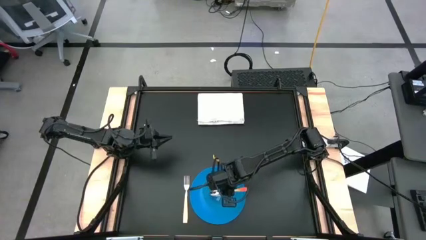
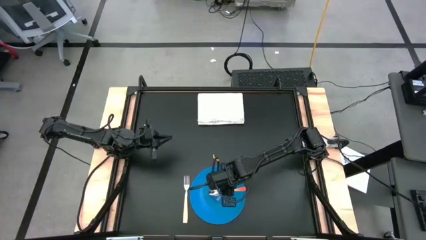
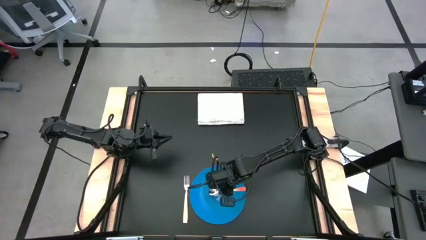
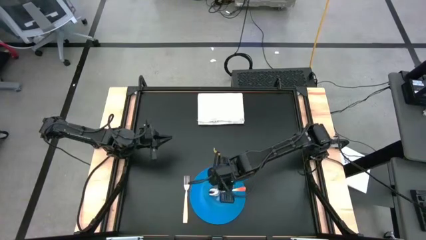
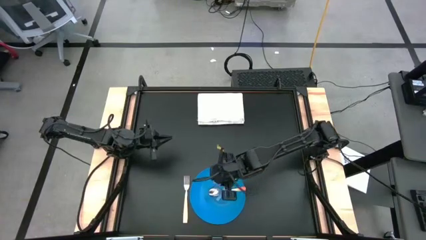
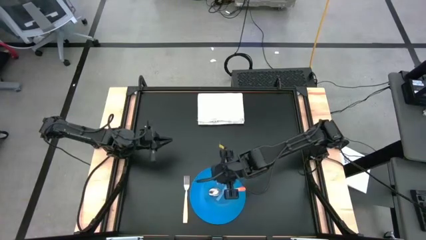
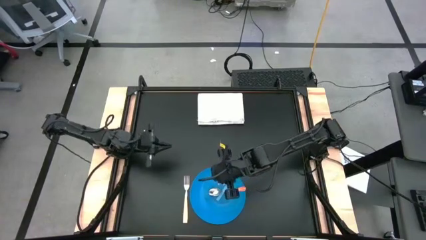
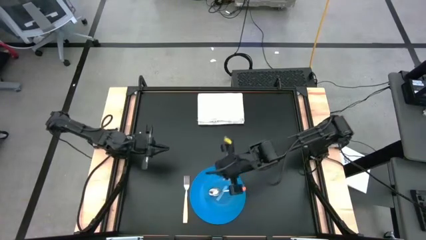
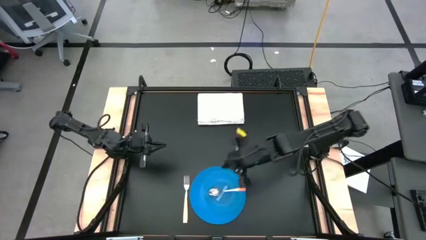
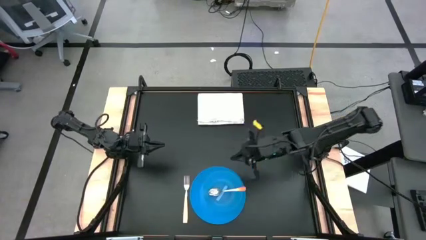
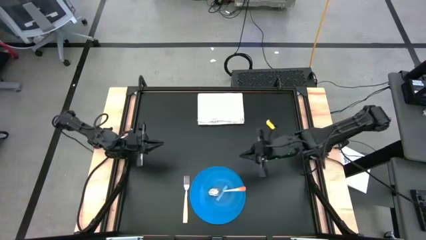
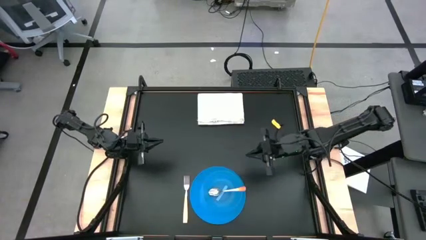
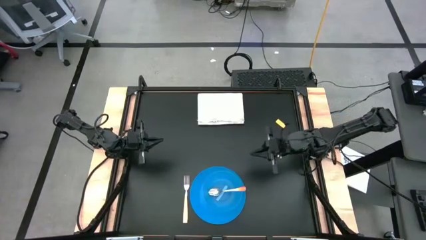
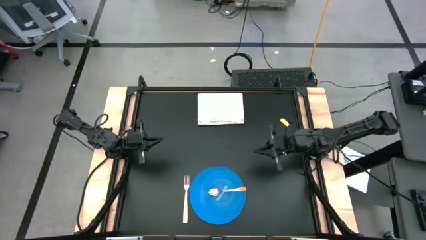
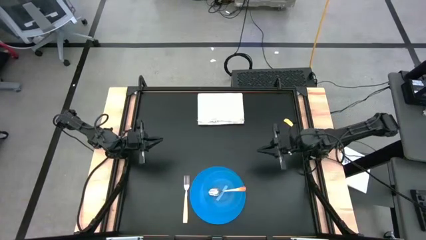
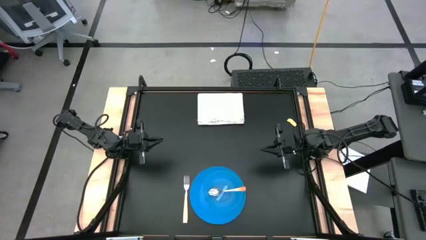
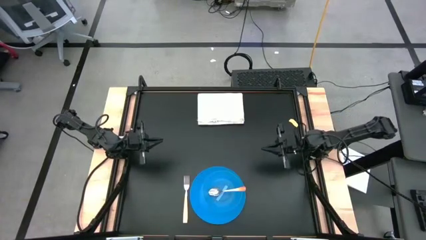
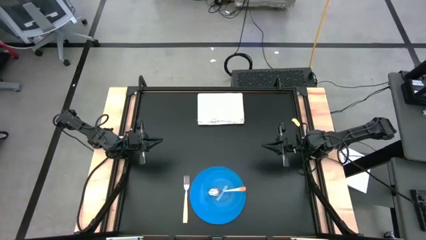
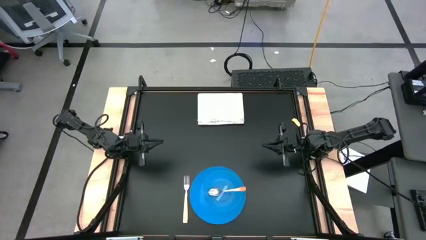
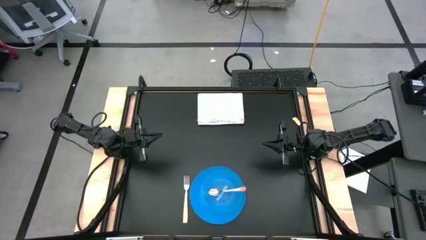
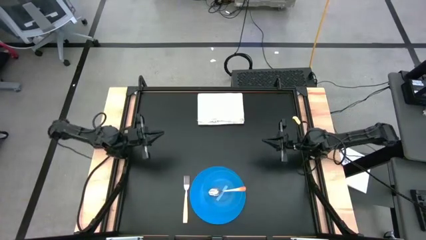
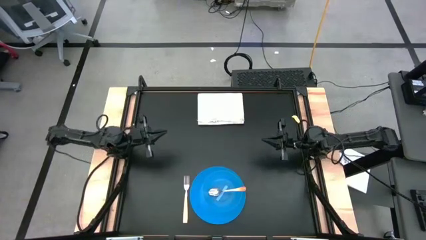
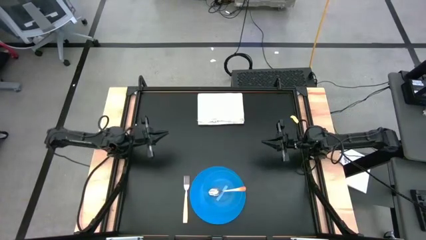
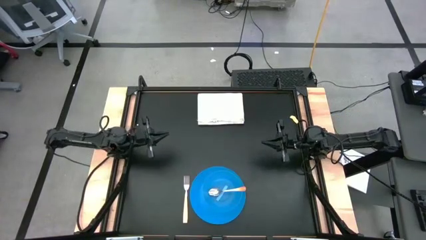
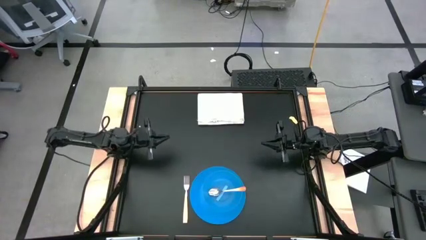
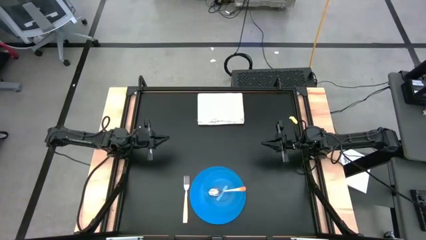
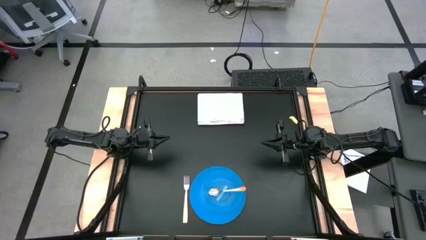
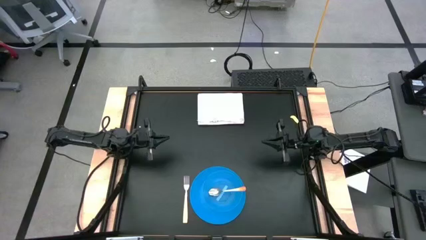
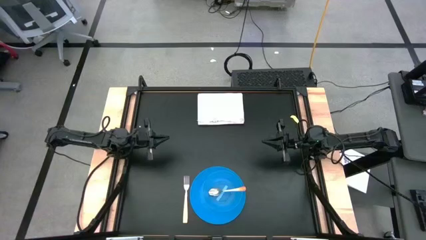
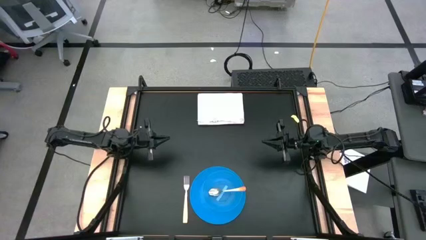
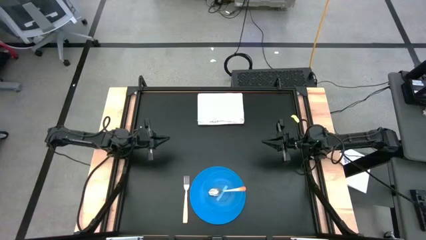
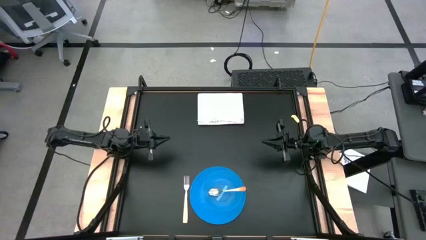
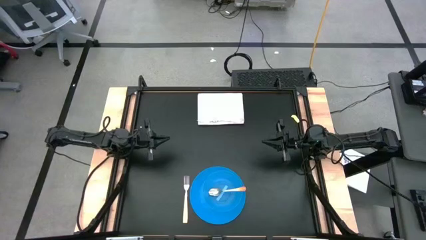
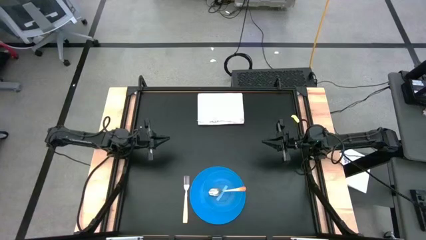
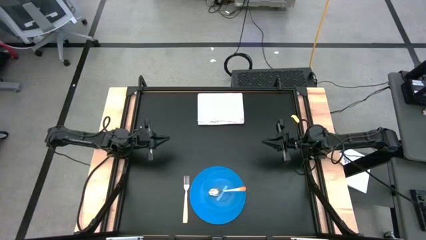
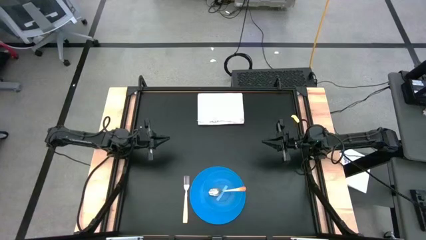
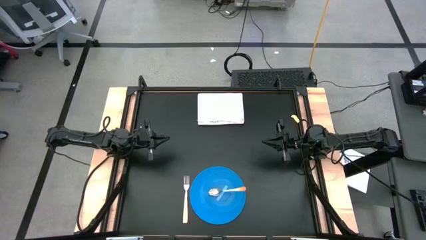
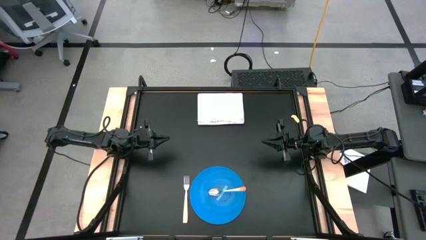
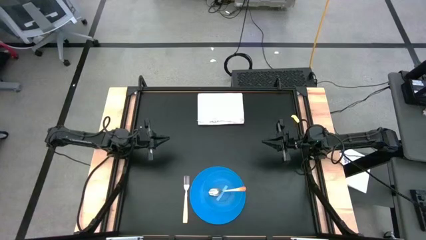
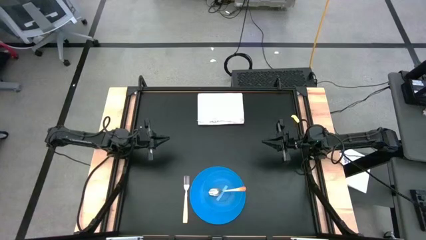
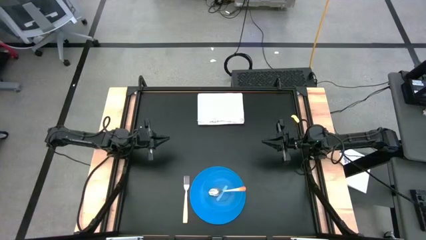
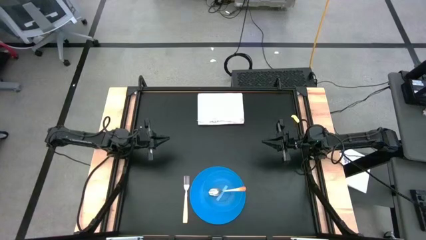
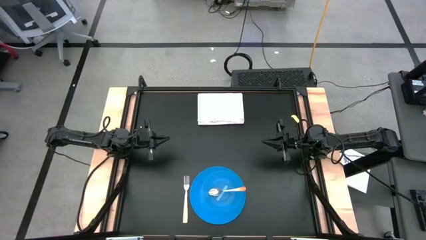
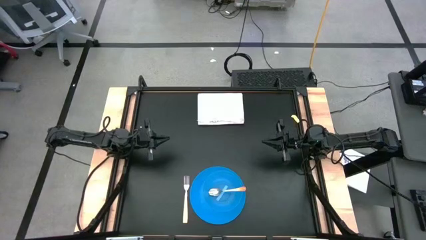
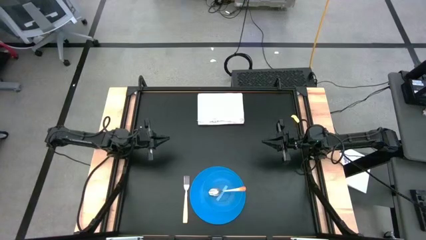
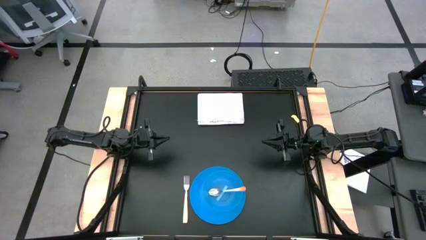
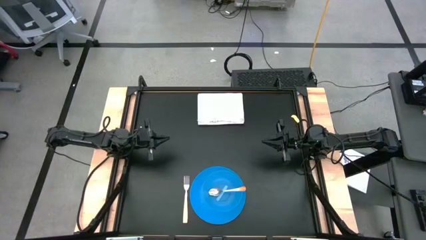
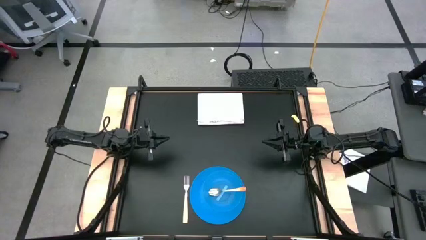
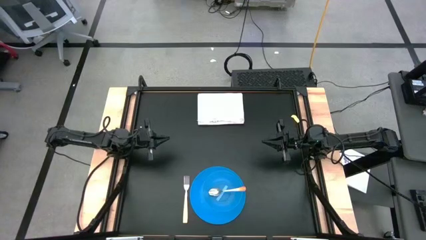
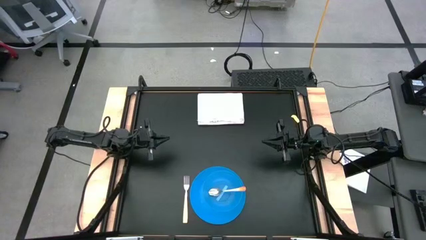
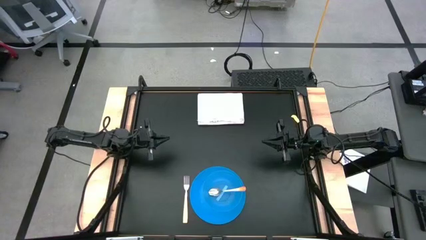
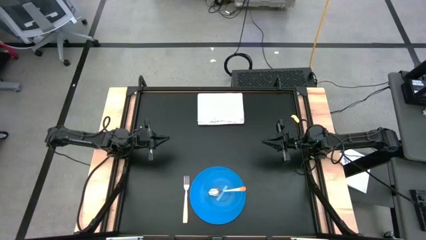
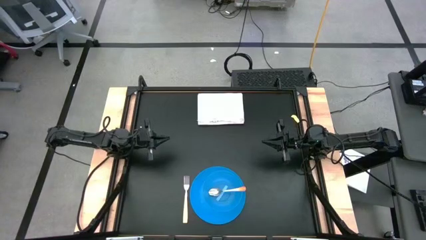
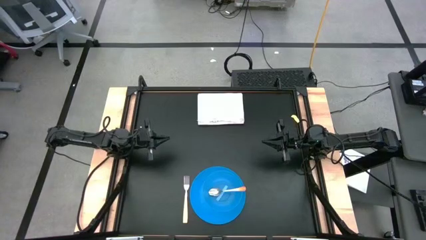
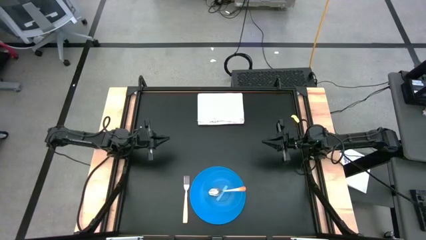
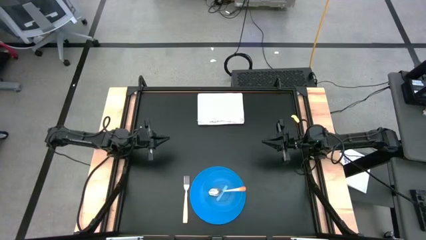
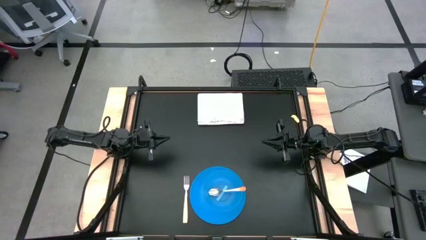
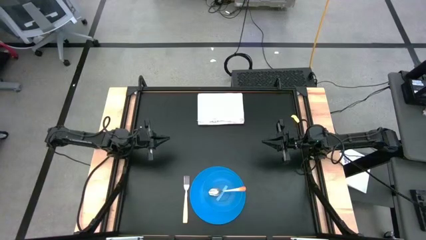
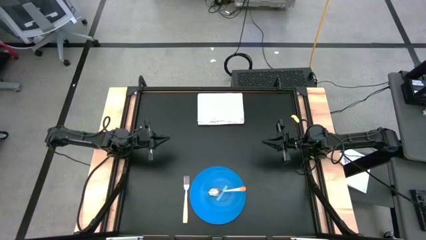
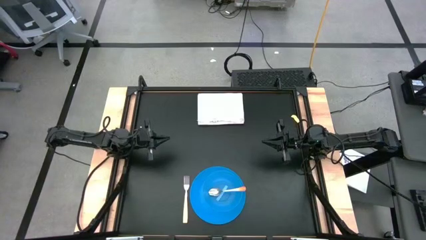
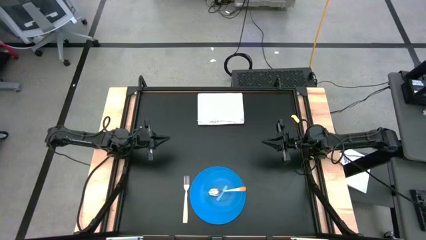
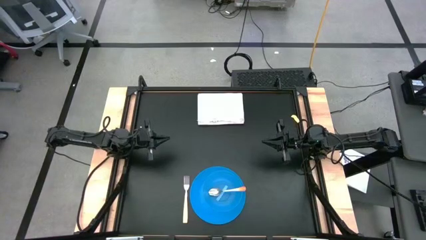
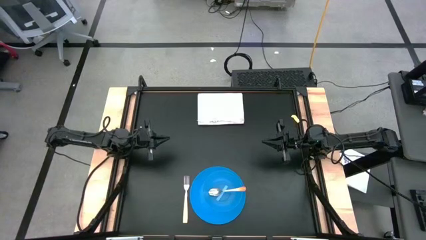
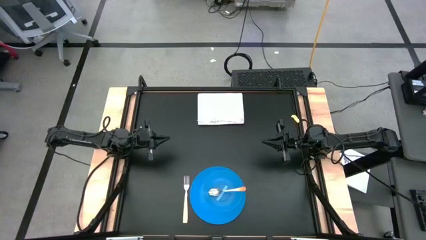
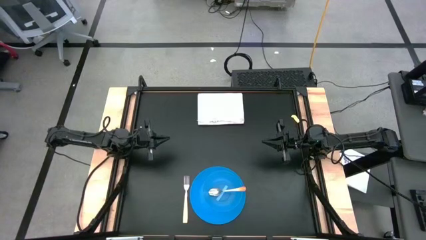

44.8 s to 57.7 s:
Task: Set table place
Return to Home Position
